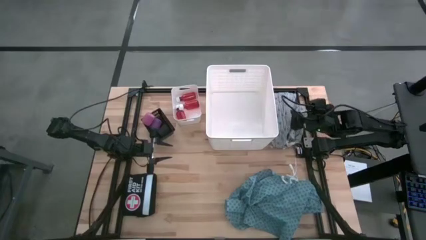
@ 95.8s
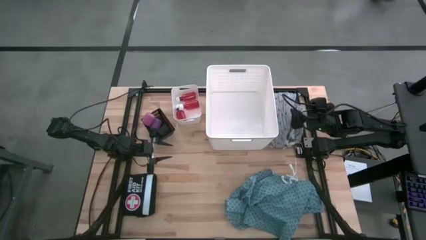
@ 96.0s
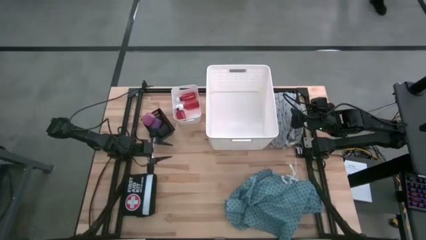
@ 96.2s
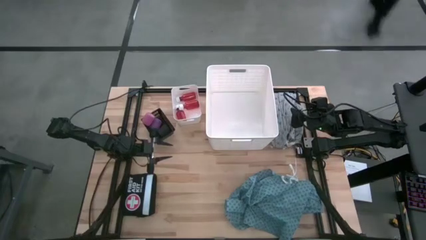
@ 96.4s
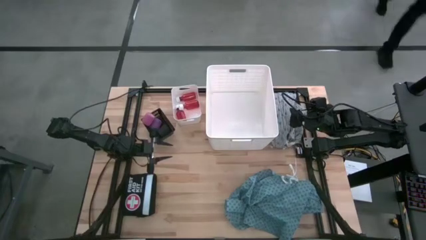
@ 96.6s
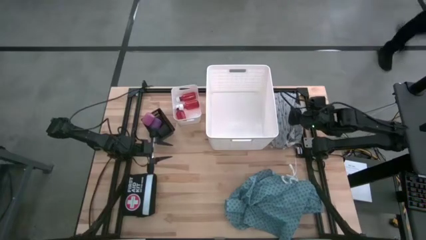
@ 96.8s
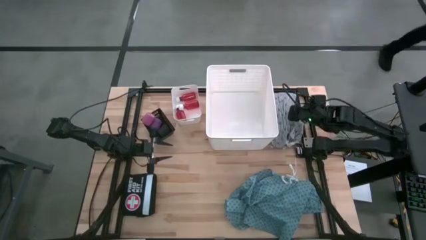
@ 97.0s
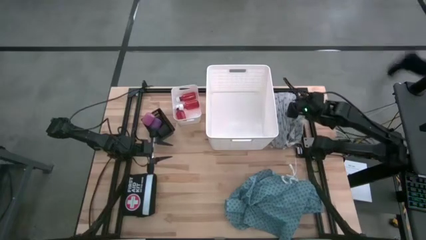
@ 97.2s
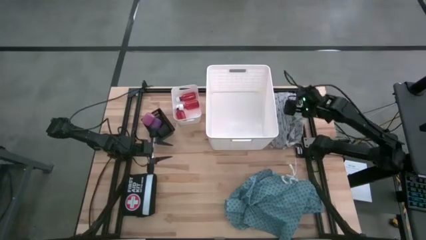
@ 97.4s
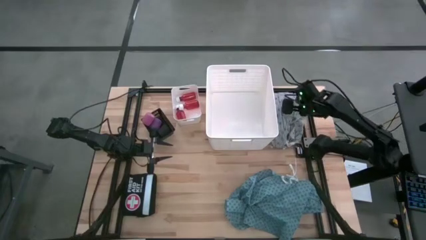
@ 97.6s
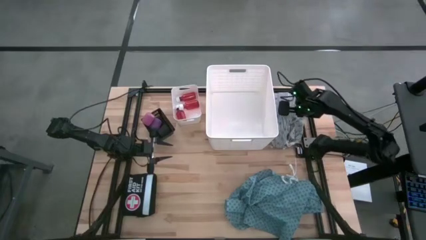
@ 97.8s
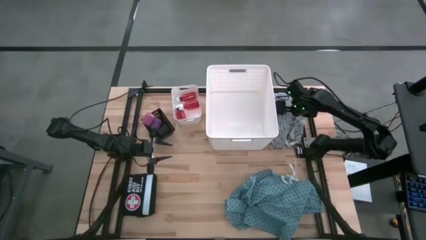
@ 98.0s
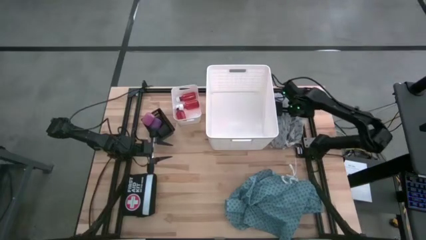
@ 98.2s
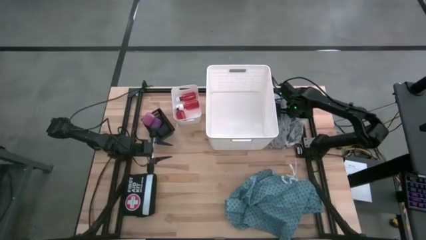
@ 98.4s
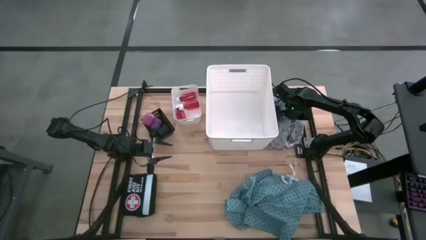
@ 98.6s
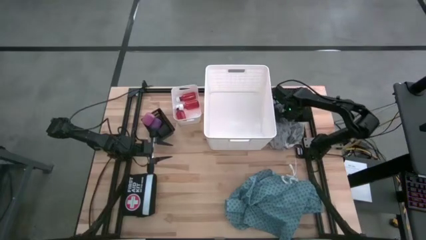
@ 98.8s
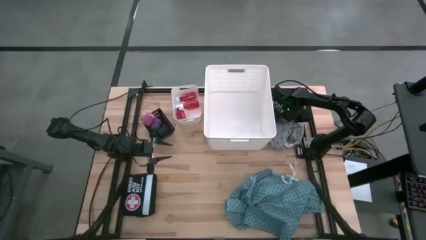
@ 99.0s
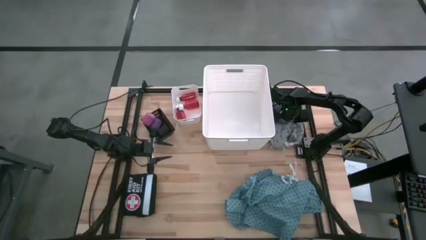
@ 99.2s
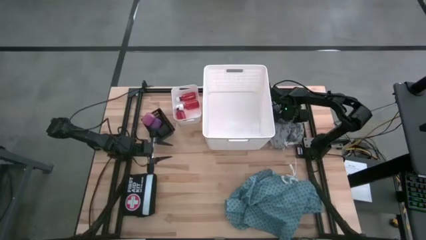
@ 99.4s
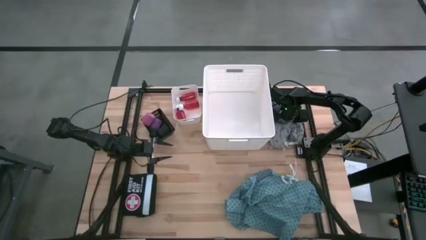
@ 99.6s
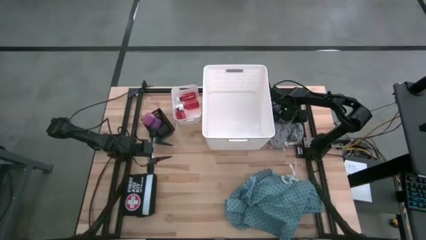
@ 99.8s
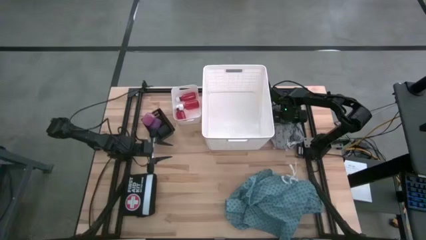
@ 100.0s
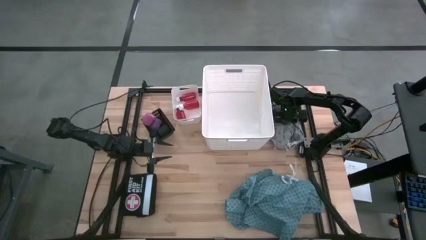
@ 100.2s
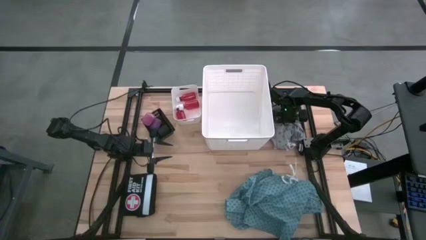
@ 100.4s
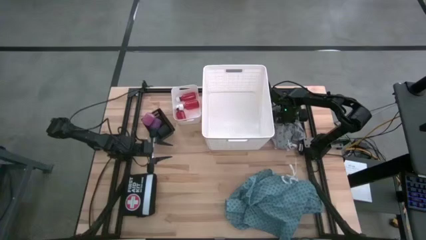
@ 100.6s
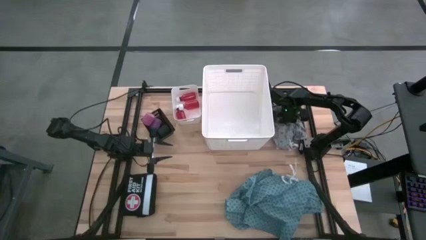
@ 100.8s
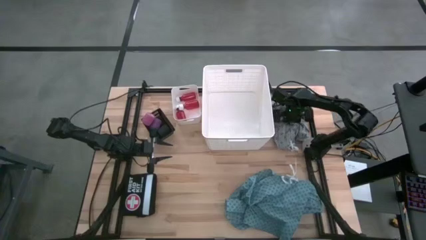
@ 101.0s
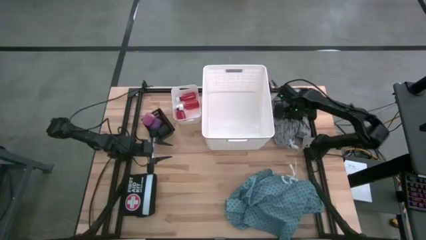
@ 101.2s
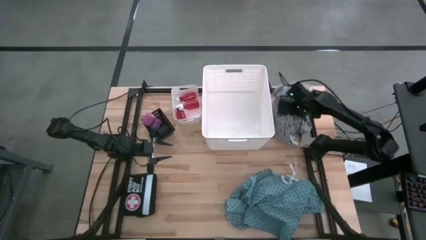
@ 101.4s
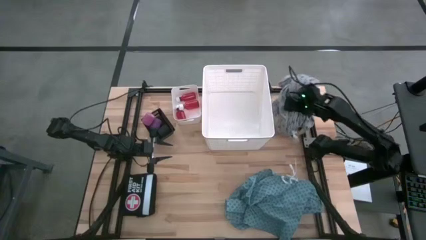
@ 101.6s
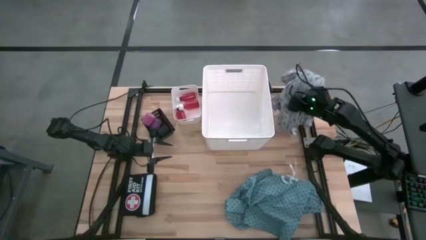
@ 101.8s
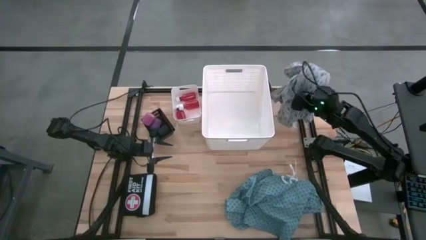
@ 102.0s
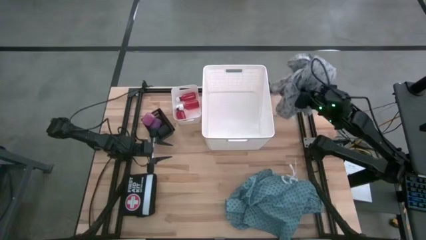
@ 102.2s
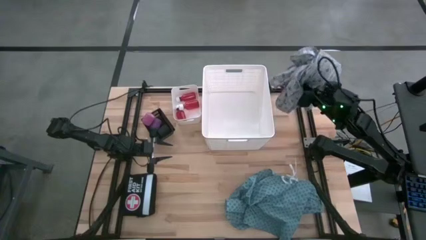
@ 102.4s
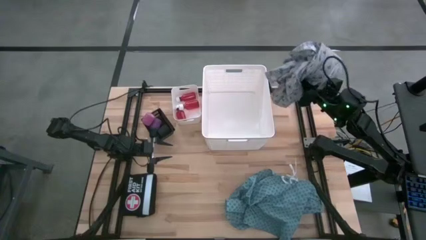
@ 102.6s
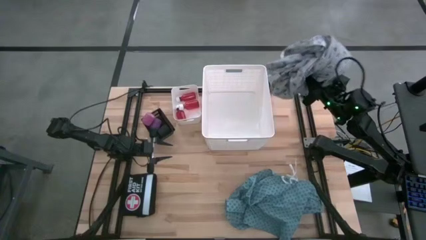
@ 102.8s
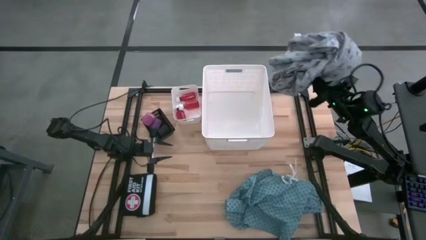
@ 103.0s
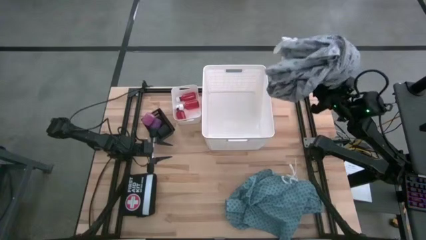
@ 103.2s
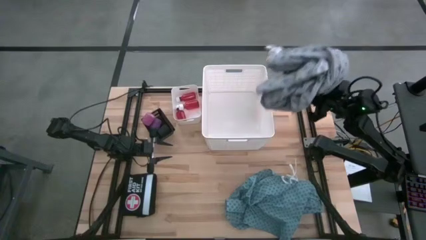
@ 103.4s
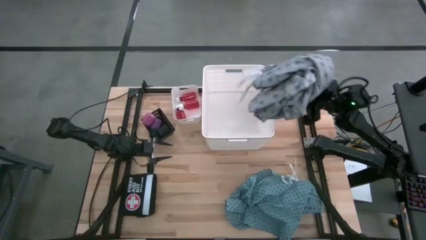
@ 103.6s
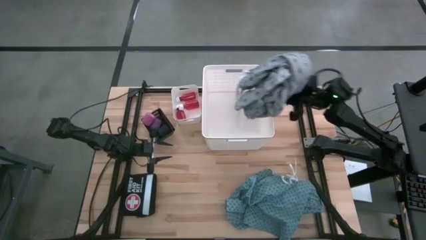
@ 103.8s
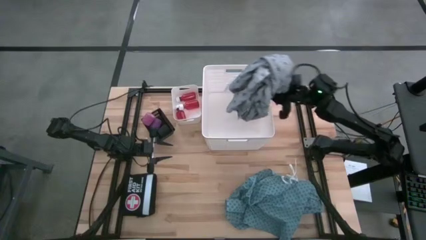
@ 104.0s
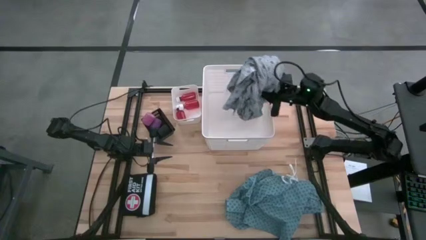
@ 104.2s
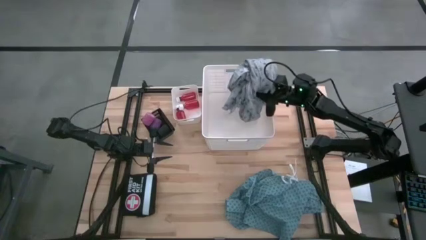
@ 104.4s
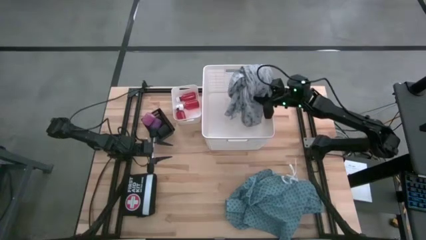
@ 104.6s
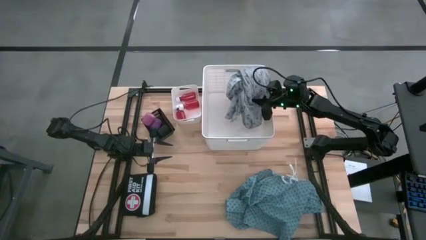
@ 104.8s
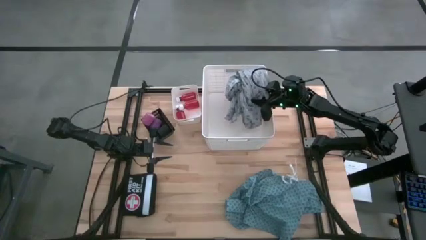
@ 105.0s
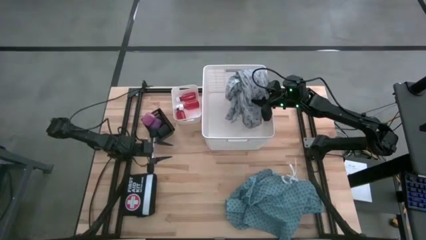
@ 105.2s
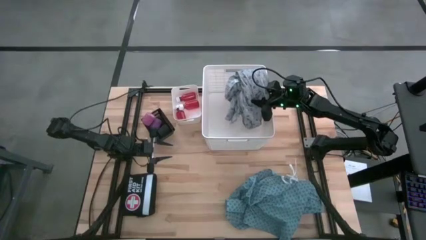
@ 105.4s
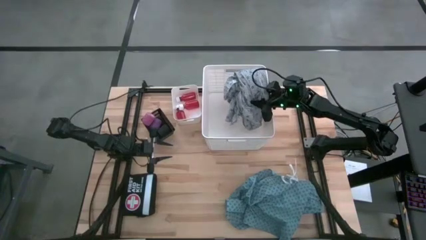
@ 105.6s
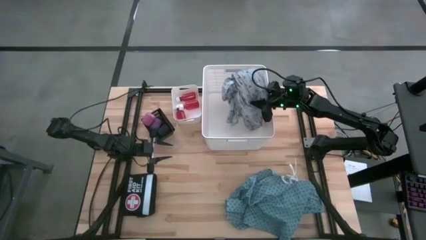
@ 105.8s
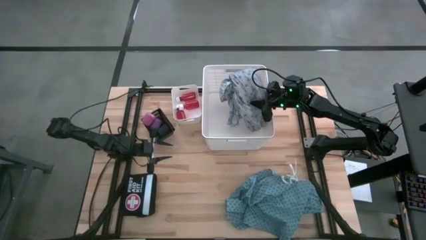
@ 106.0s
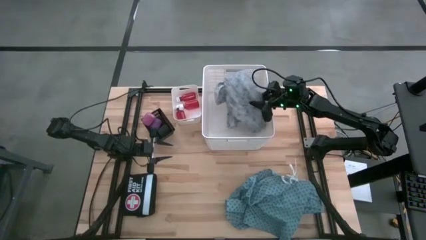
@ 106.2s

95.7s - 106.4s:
Task: Pick & Place Medicine items
Put the gray patient gown into the white laundry bin

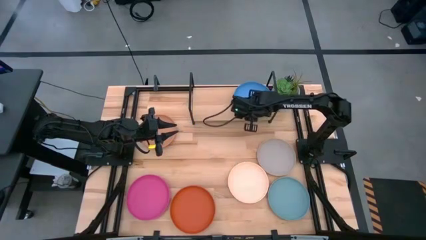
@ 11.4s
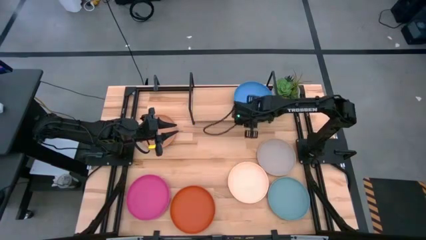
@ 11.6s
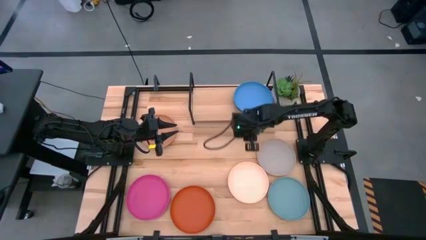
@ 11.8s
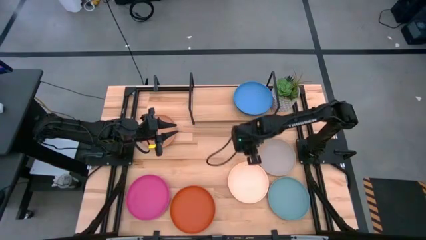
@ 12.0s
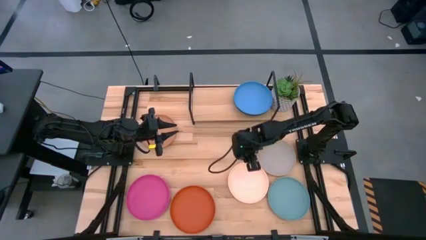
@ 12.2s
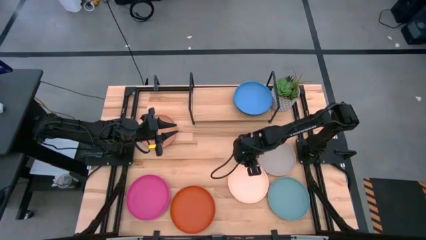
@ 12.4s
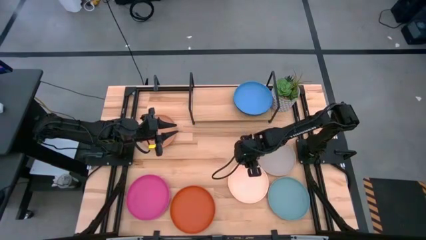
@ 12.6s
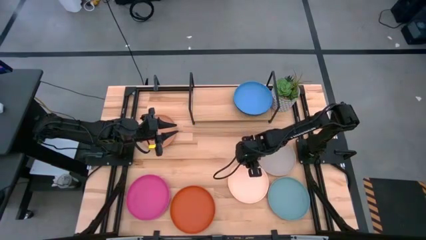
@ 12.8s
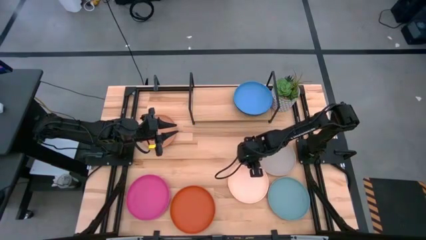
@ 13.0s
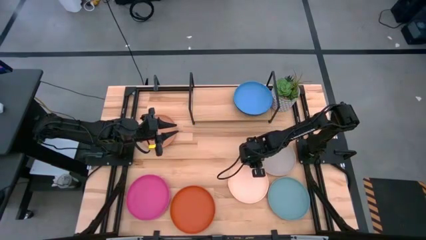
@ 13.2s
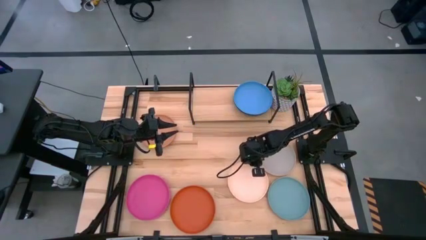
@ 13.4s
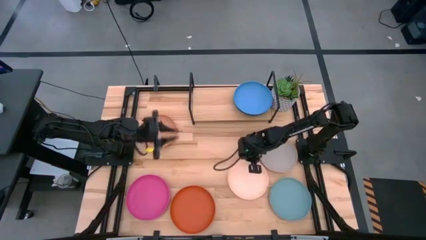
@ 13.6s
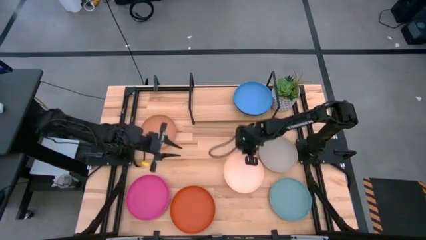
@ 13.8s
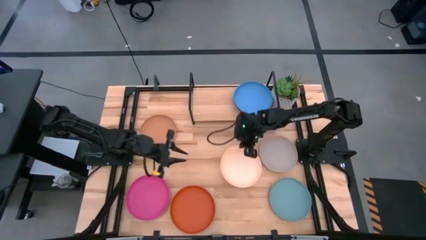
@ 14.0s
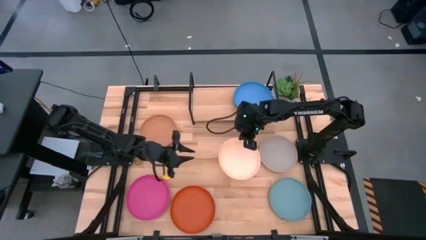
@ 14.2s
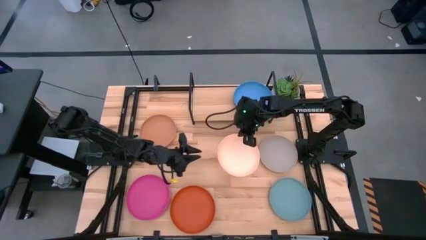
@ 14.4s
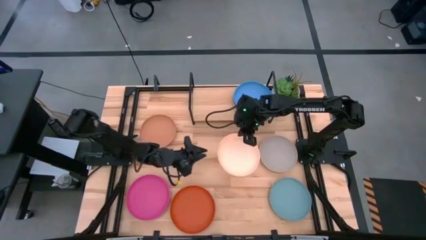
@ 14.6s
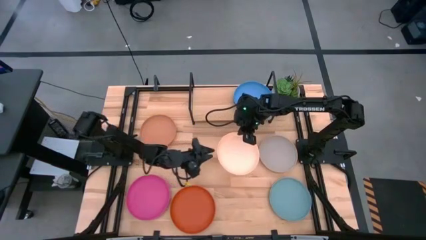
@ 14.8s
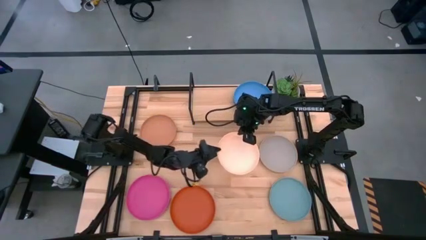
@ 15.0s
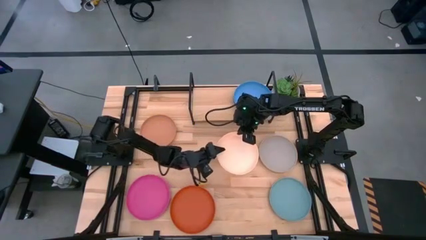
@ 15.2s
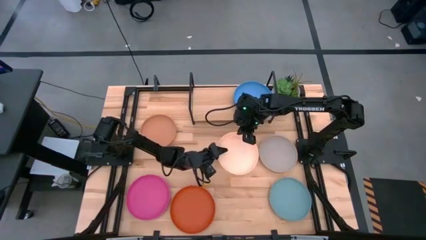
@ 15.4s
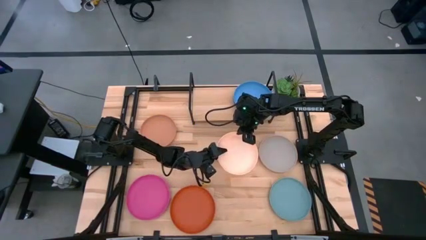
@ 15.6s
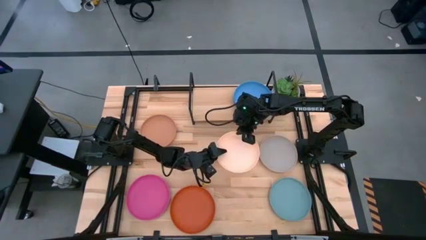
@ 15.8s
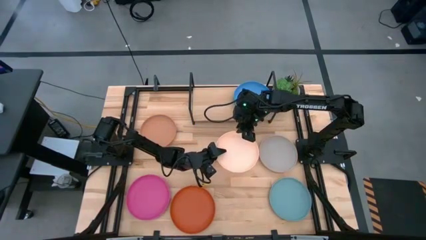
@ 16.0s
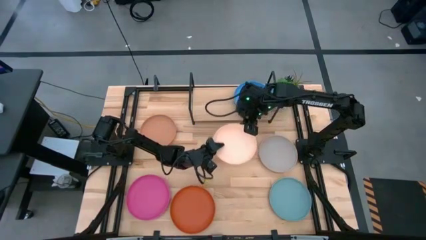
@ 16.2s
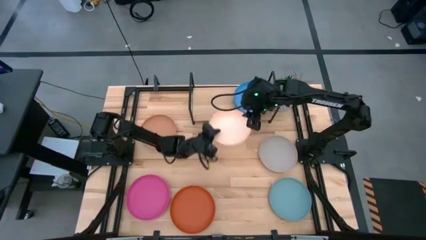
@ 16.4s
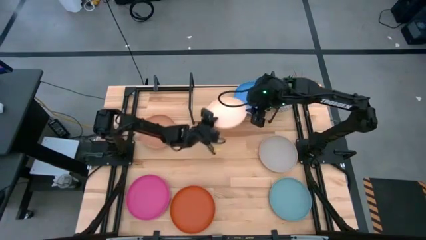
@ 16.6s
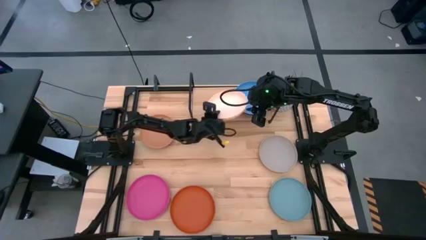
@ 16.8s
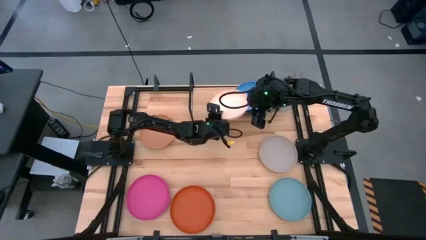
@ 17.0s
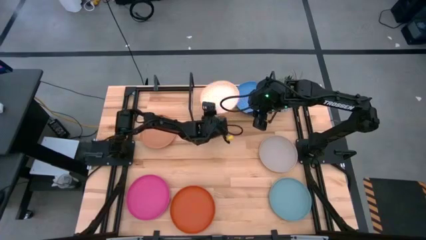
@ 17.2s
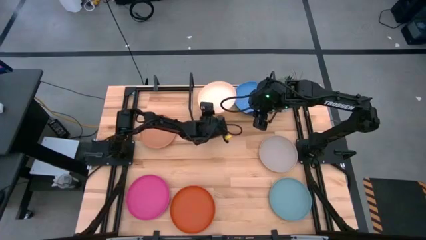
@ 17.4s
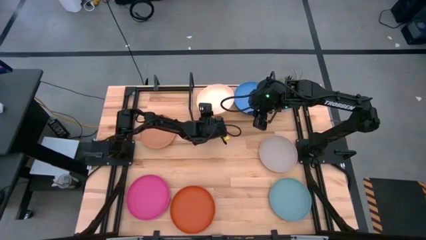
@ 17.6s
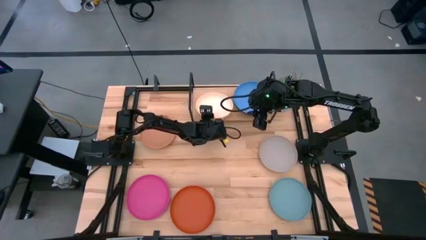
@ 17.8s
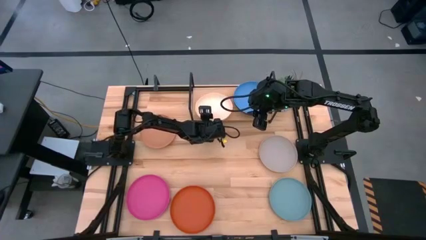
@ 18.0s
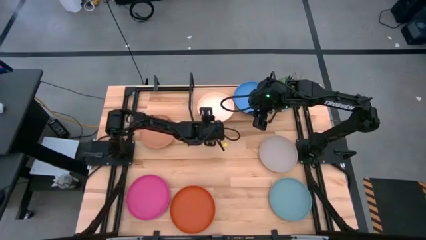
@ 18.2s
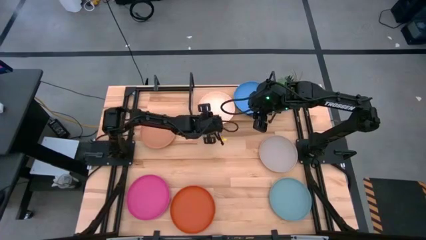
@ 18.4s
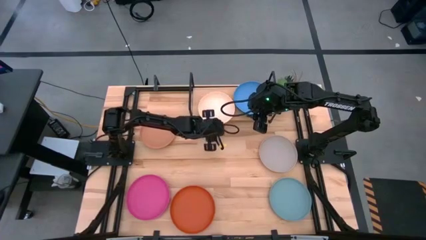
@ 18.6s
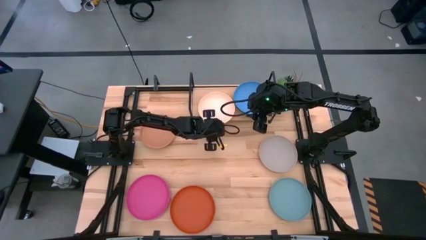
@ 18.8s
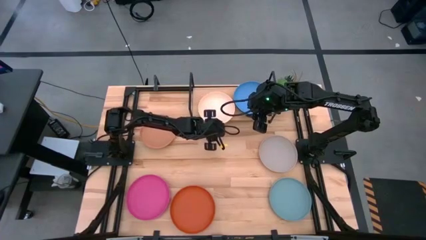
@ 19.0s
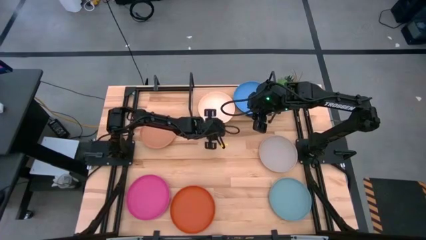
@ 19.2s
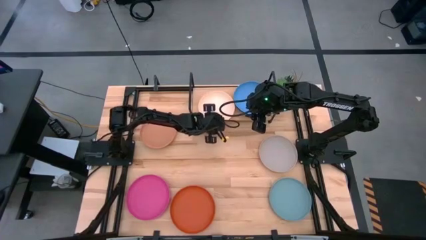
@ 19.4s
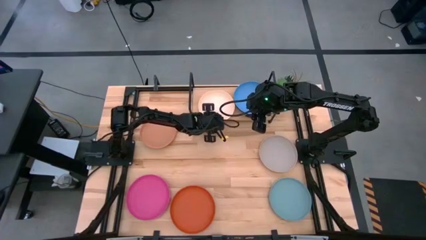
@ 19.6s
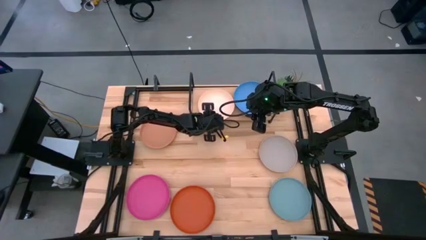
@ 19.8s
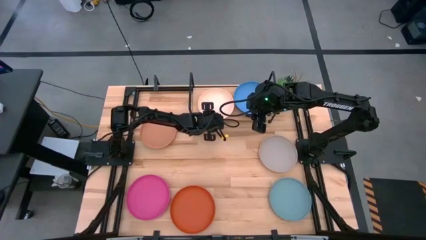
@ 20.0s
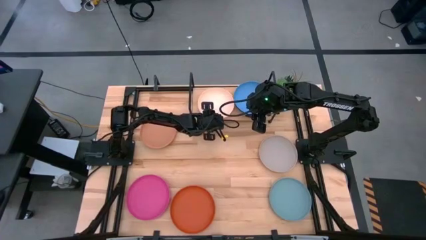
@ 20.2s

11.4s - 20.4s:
Task: Place and stack plates onto a shelf
Put the light orange plate on the shelf
